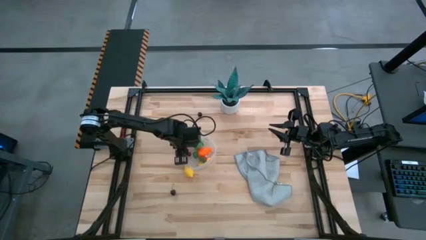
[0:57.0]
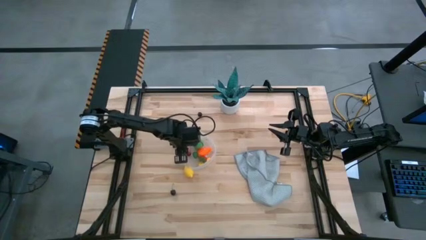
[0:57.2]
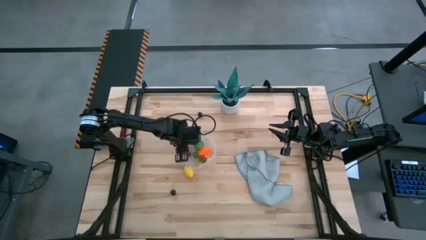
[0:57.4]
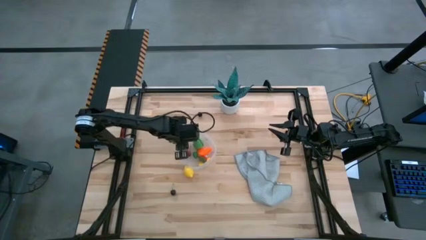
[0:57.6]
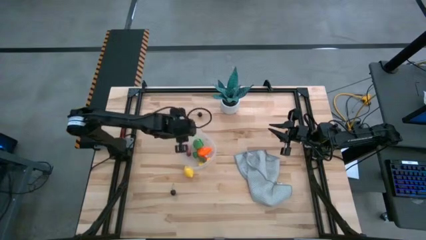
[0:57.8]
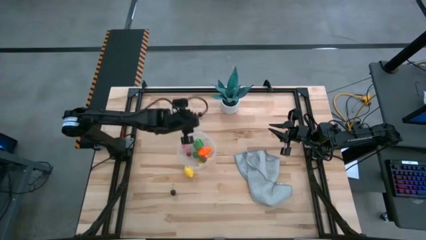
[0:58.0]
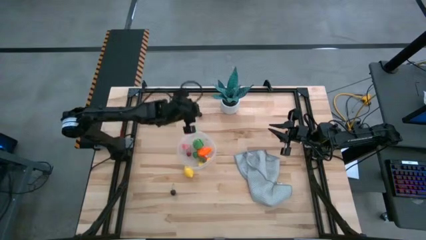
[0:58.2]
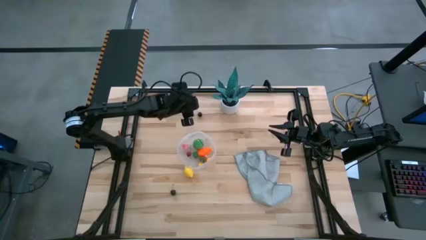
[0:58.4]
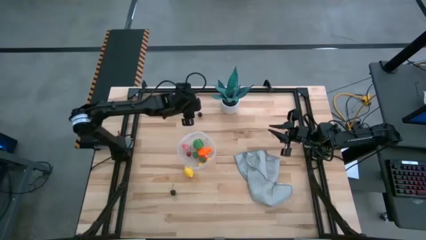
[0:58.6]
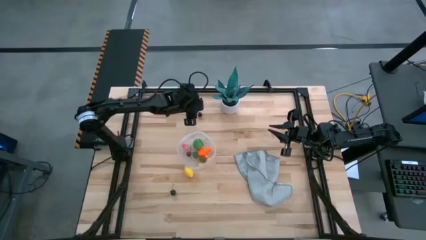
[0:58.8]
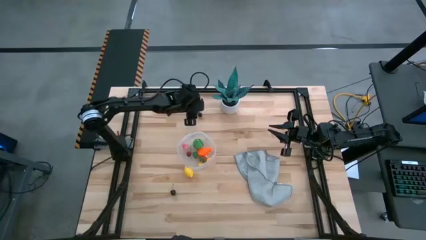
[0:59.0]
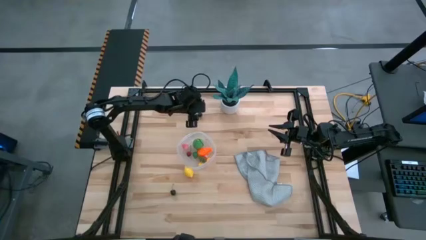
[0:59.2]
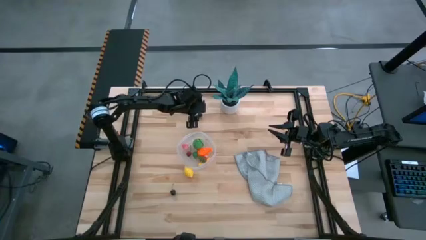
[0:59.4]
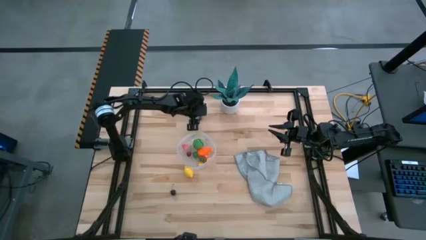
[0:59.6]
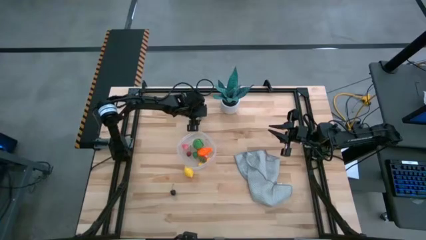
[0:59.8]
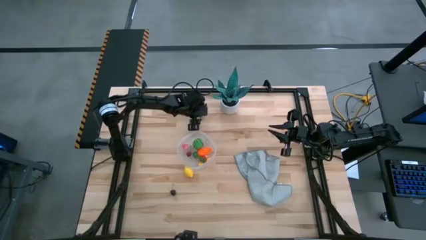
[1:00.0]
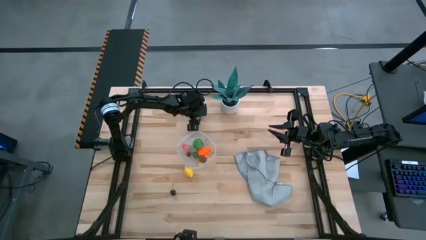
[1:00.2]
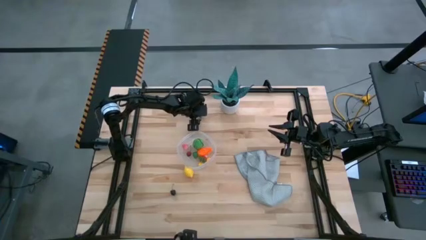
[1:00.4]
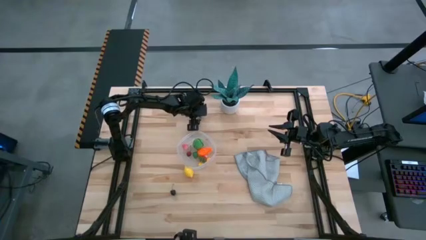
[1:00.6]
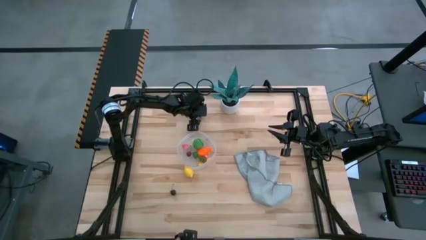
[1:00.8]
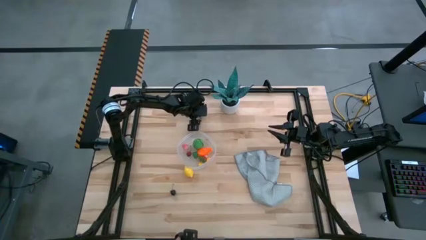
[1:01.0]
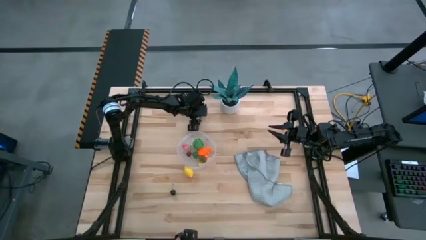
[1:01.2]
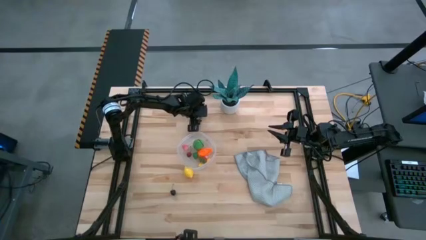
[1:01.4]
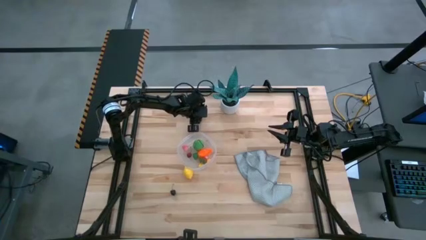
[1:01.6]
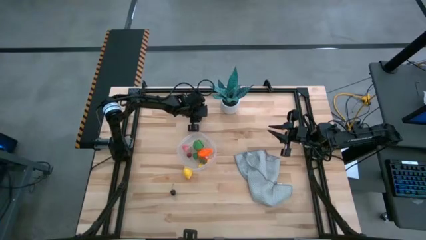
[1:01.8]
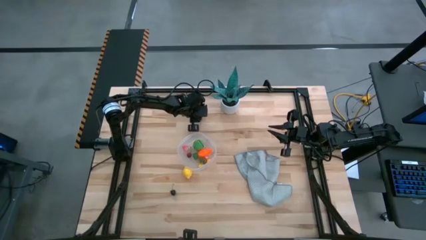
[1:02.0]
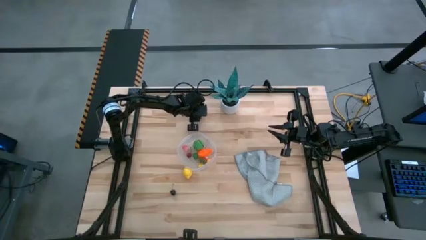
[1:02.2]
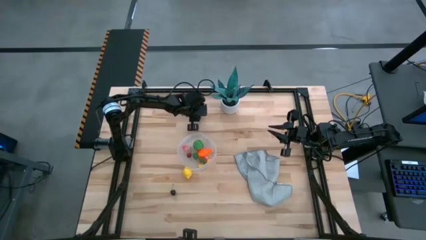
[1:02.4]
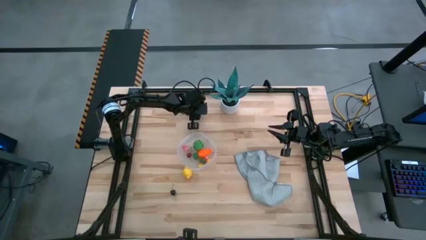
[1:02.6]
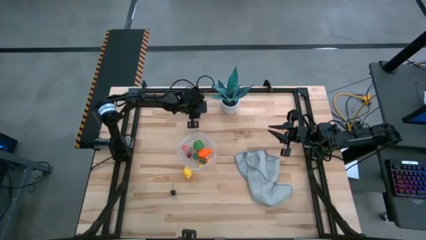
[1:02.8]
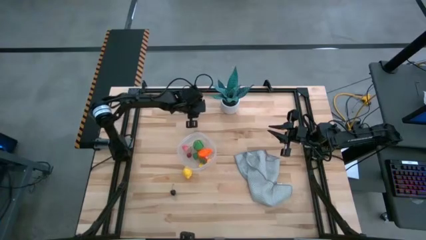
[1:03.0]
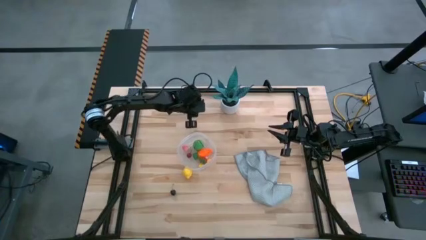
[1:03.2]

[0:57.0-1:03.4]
Task: Pick and placing Produce into tupperware
Put the black raspberry into the transparent bin

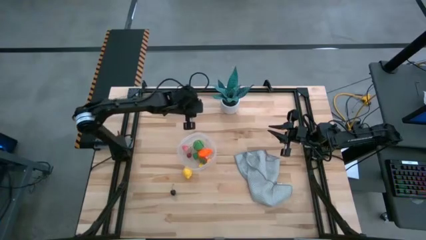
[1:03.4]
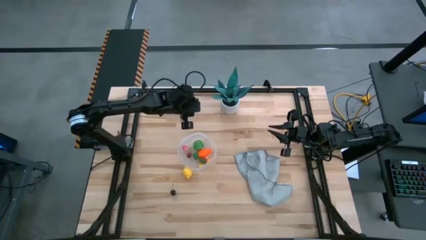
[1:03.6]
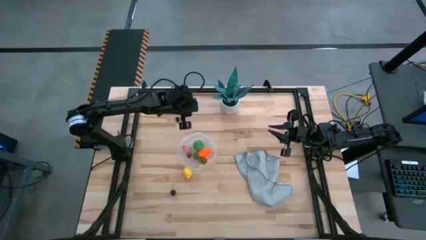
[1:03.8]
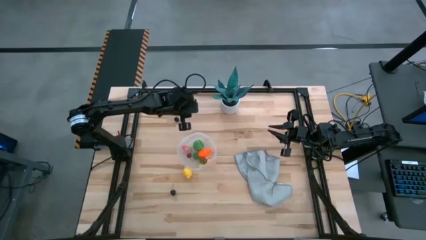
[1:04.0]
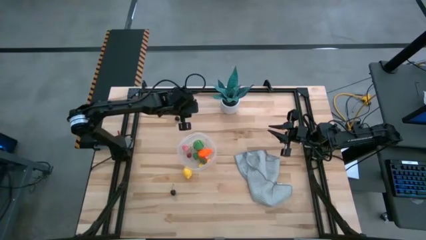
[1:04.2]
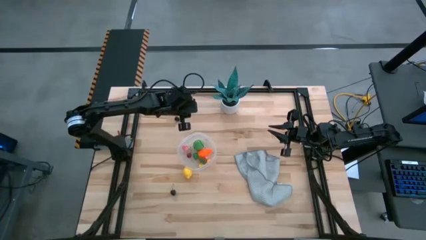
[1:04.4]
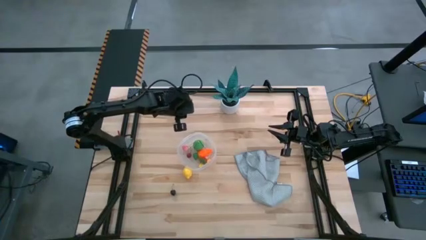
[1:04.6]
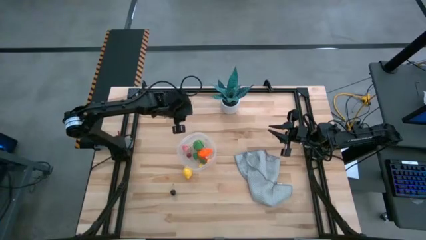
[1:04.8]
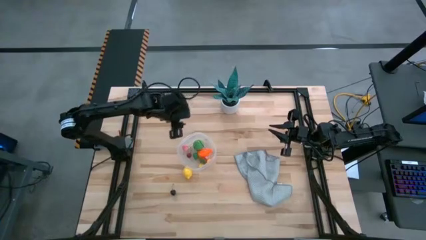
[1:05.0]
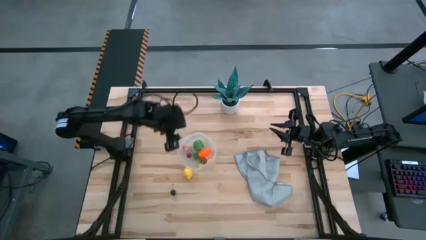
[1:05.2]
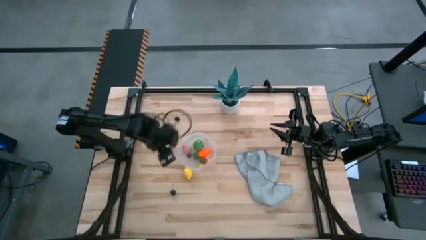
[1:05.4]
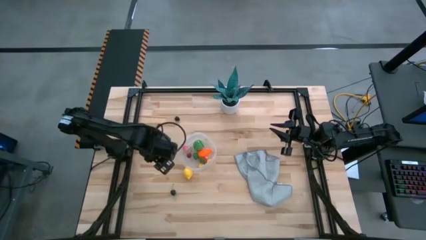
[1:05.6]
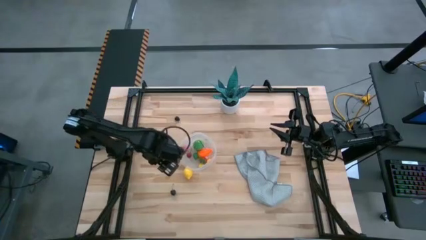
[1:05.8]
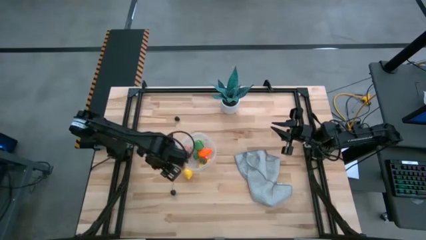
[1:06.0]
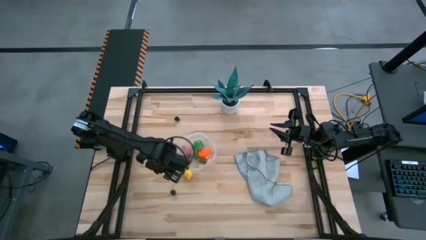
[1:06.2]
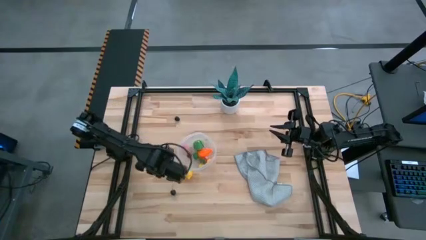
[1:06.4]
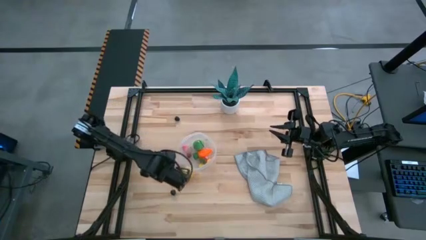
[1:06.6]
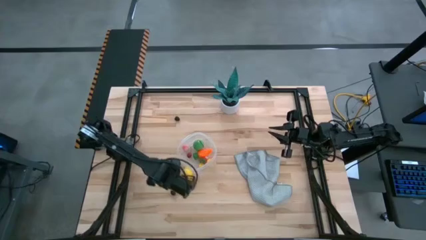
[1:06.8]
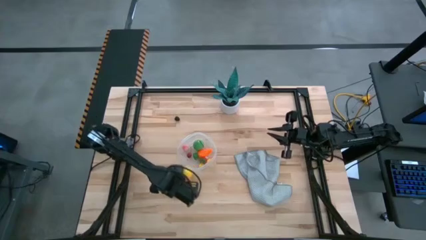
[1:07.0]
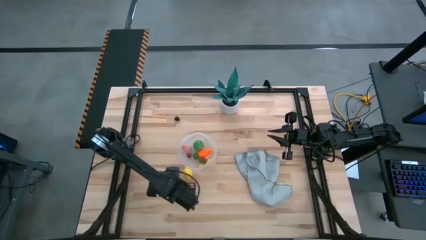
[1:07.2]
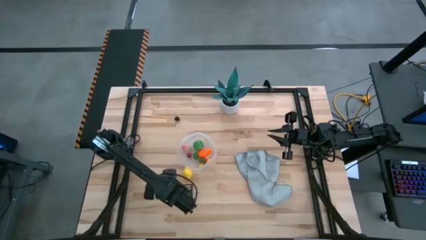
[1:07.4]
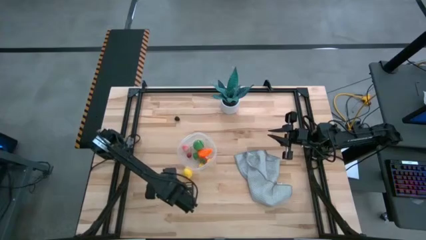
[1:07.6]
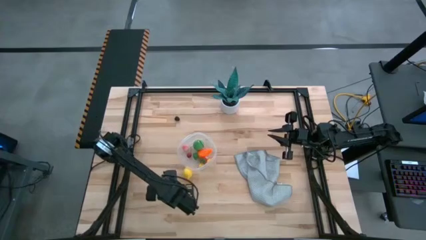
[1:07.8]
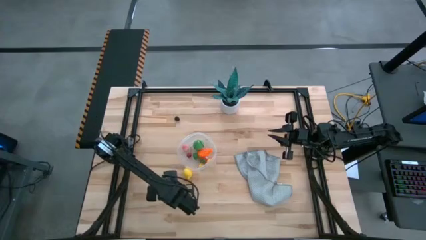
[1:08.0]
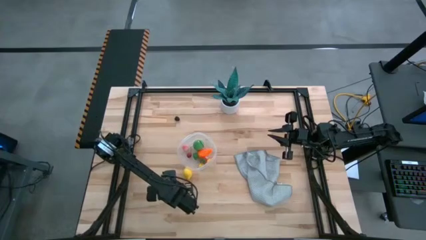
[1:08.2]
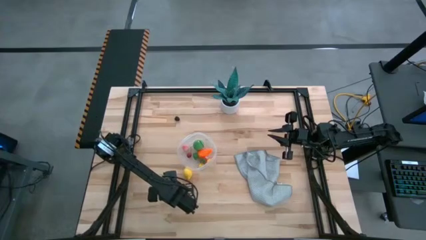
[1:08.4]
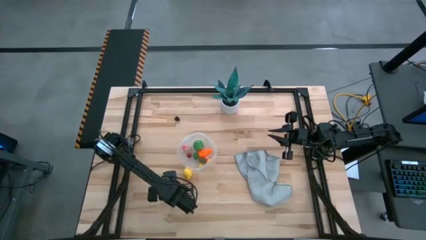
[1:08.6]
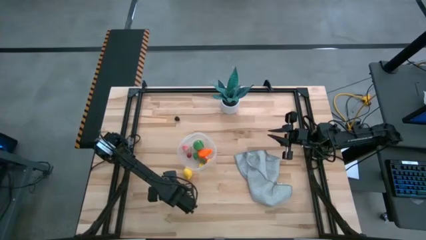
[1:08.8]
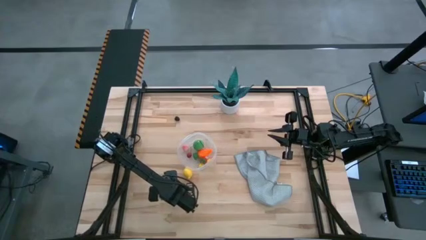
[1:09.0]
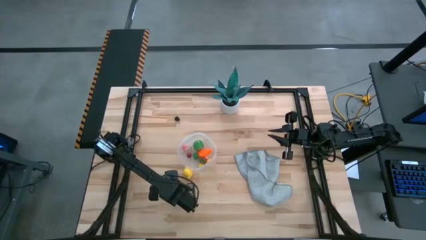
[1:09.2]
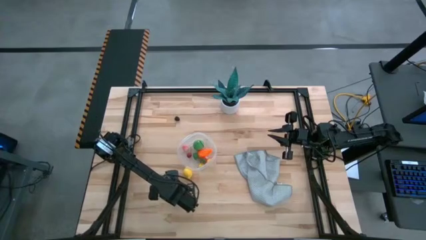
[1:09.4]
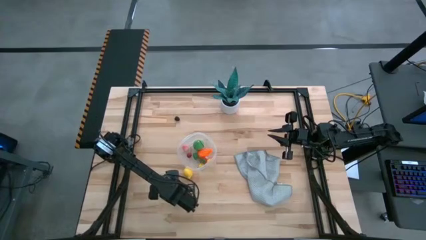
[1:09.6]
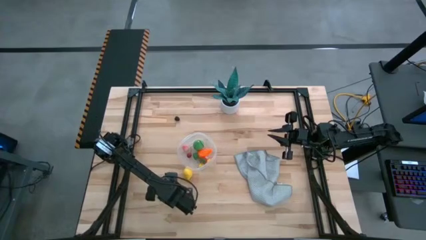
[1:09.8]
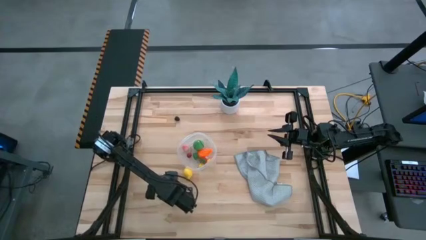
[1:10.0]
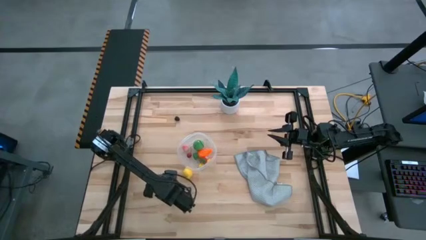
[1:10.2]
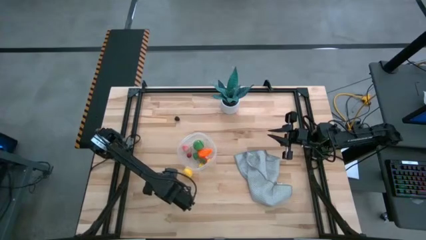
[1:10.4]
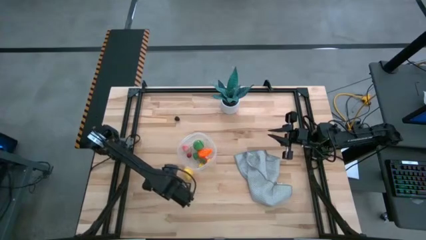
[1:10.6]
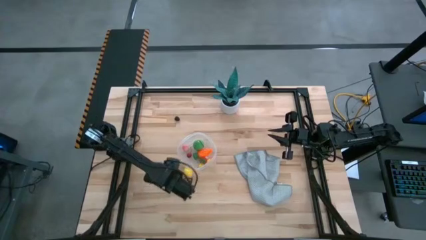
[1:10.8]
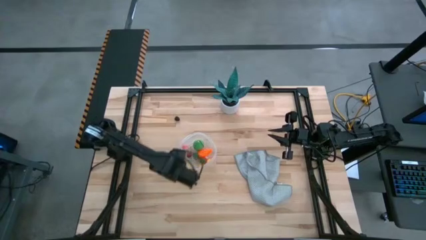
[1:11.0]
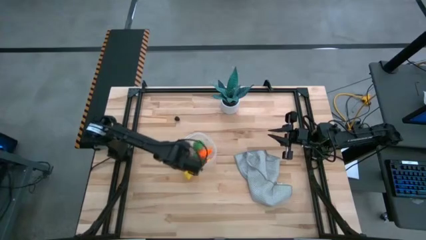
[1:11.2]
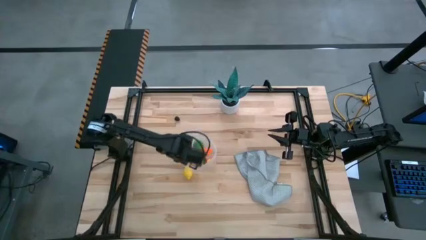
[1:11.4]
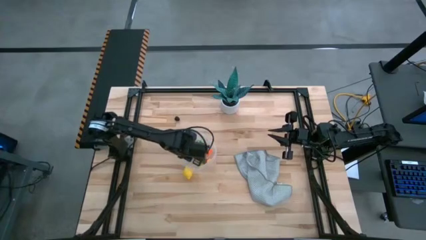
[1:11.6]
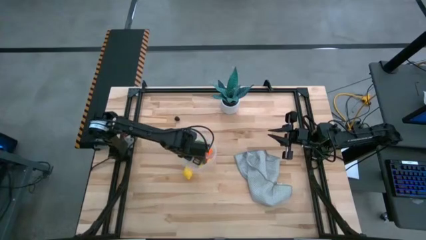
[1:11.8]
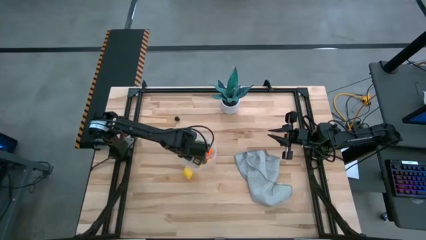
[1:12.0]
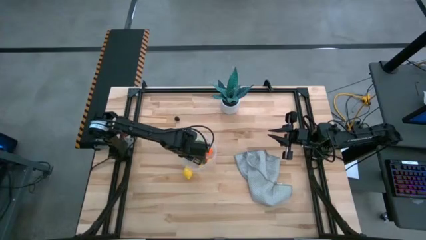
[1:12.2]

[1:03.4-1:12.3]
Put the black cherry into the transparent bin

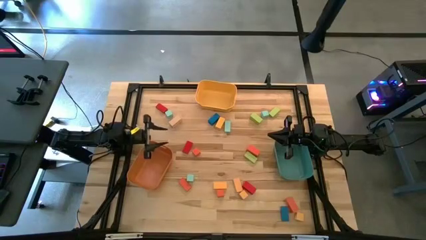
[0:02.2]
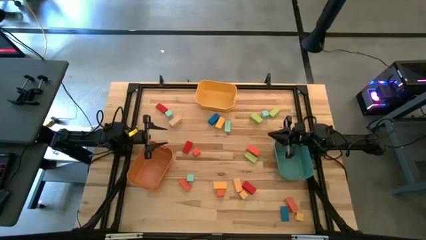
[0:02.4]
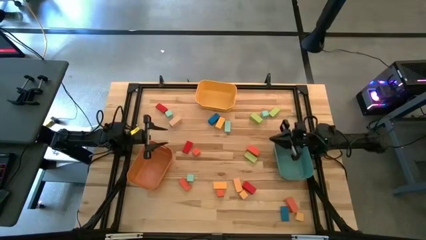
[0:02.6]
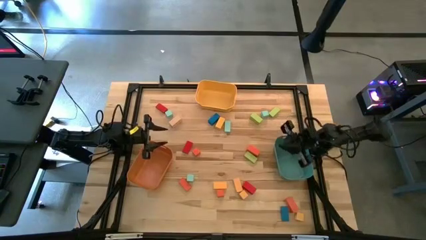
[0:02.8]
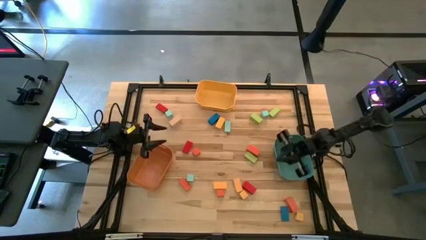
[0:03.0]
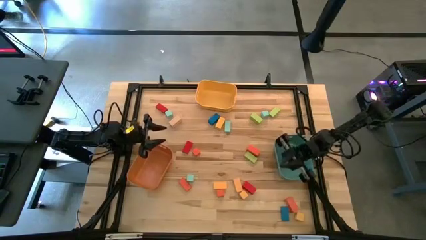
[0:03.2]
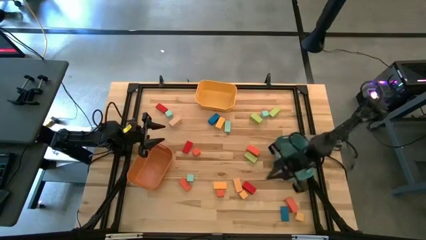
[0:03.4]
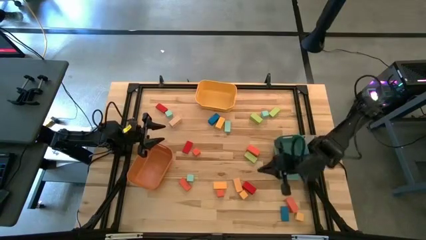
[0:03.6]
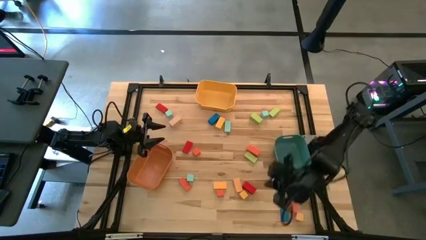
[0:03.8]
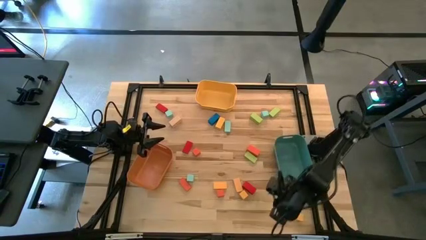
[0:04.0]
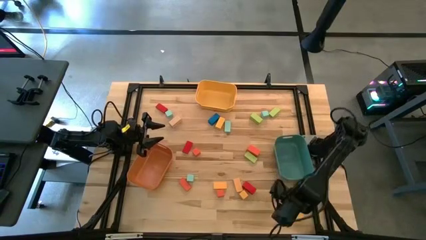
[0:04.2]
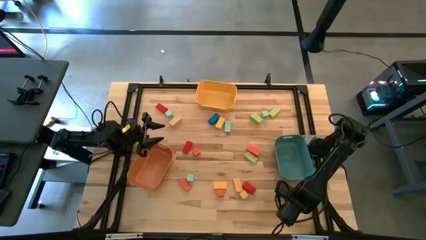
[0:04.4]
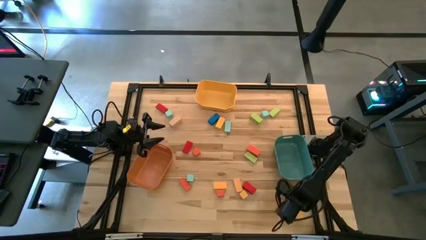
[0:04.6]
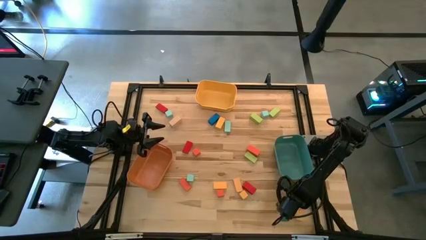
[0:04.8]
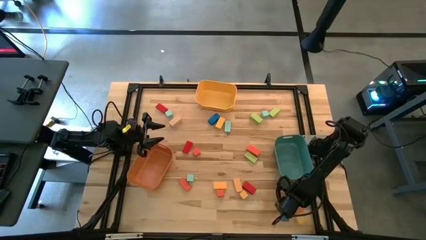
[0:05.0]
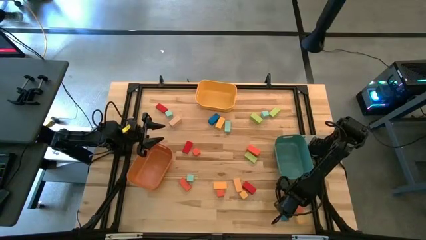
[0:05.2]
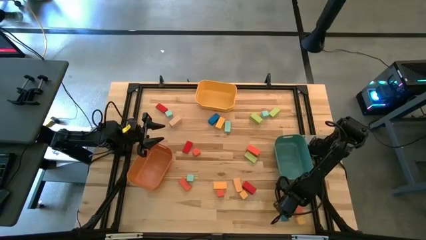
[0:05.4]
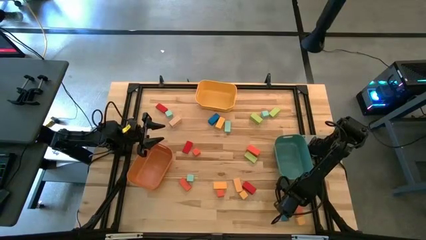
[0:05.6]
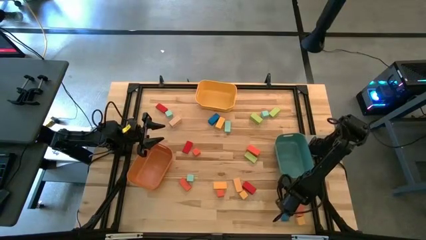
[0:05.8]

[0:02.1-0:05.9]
Task: Sort blocks by size
Put the thick orange rectangular block into the green bin
